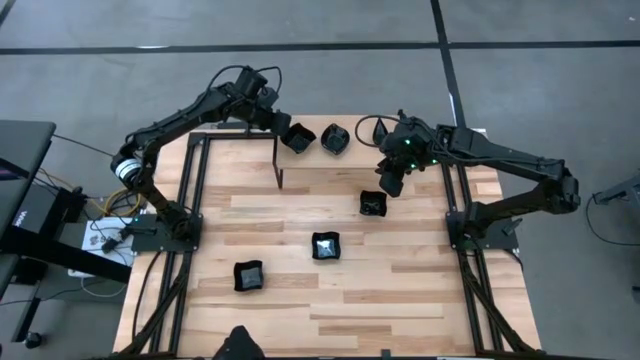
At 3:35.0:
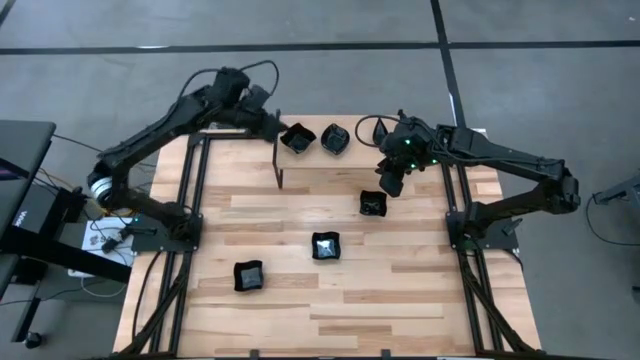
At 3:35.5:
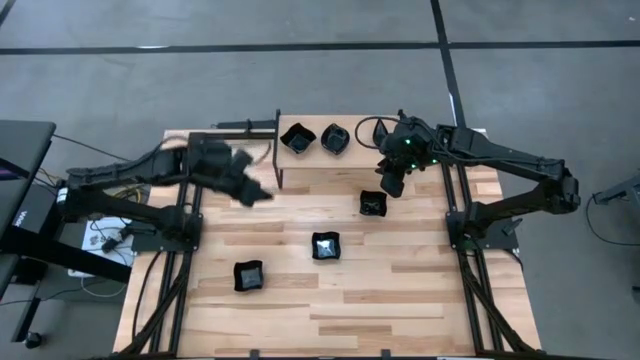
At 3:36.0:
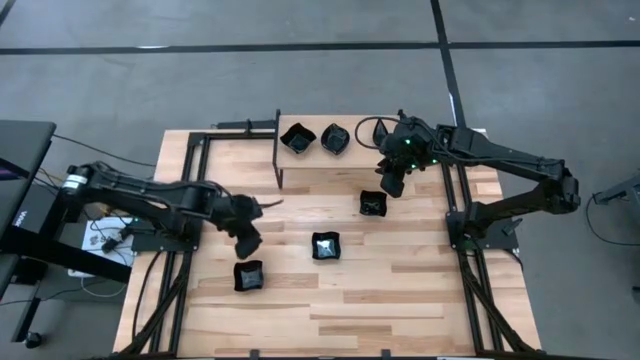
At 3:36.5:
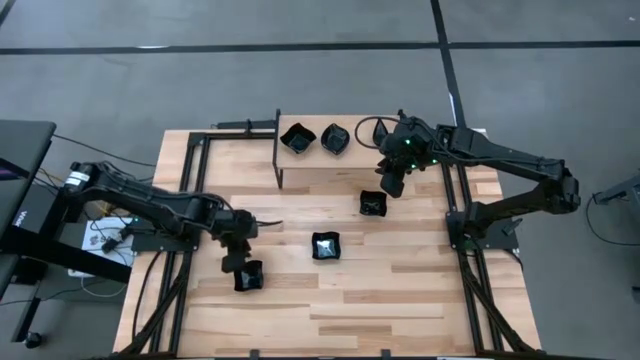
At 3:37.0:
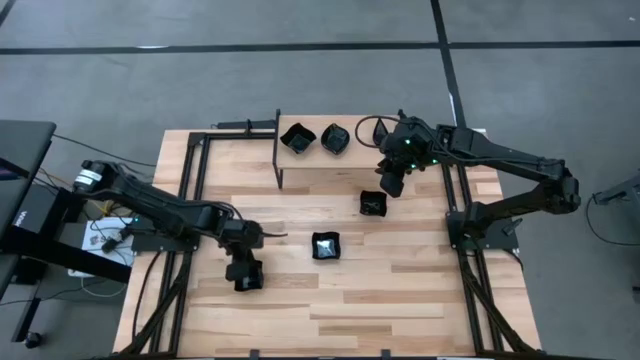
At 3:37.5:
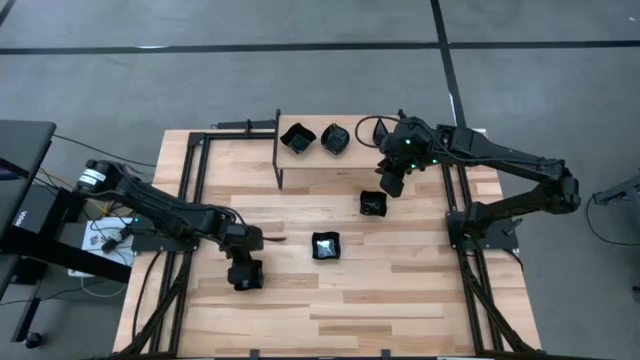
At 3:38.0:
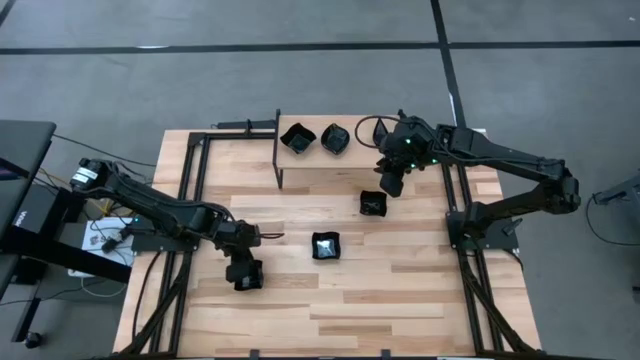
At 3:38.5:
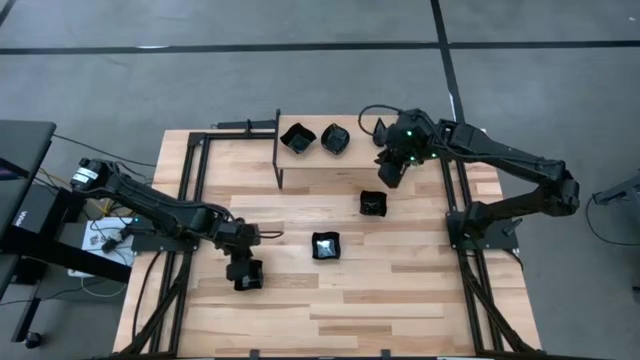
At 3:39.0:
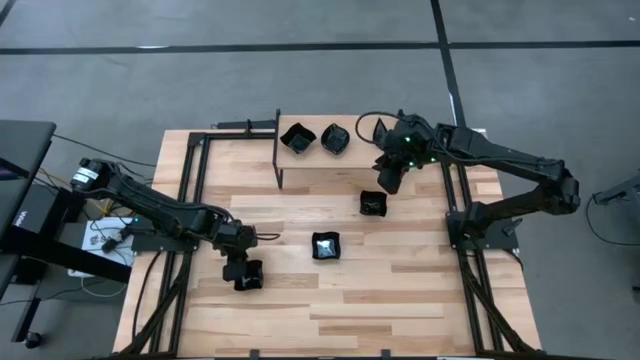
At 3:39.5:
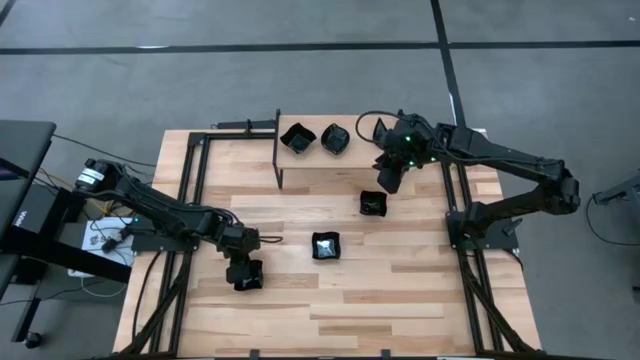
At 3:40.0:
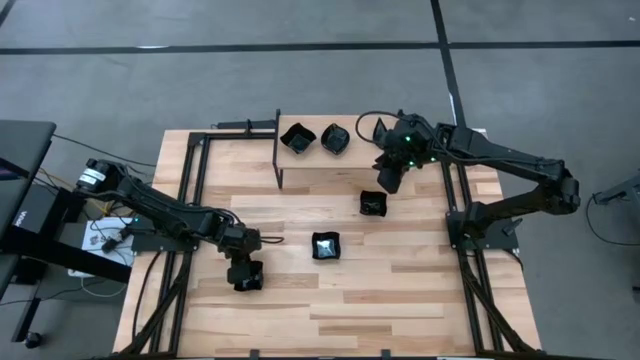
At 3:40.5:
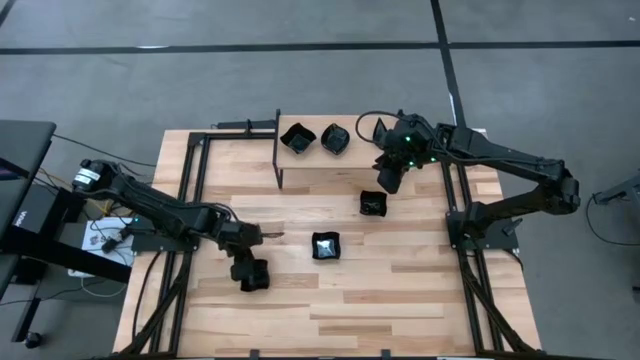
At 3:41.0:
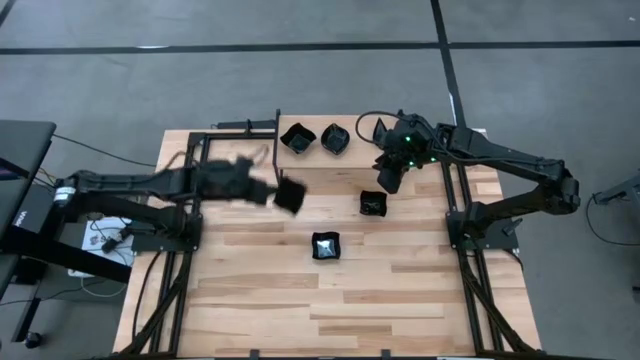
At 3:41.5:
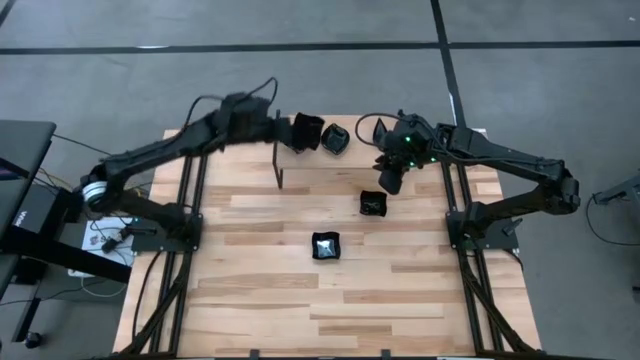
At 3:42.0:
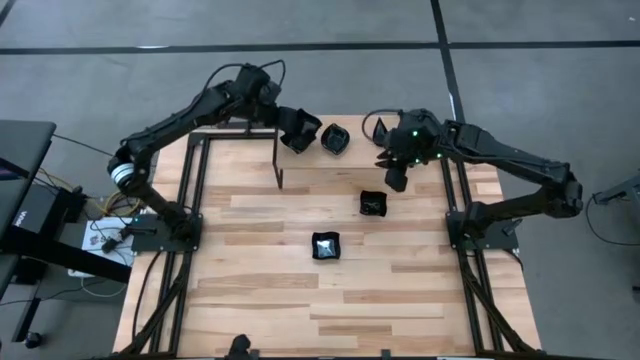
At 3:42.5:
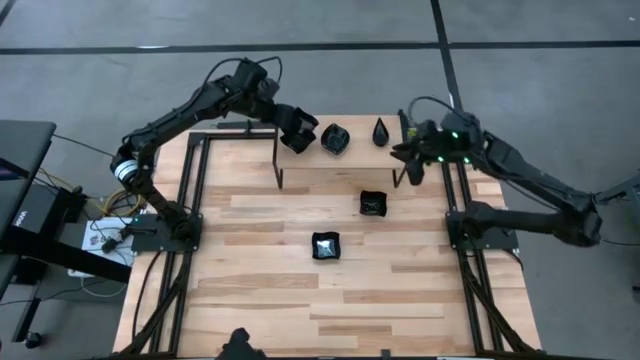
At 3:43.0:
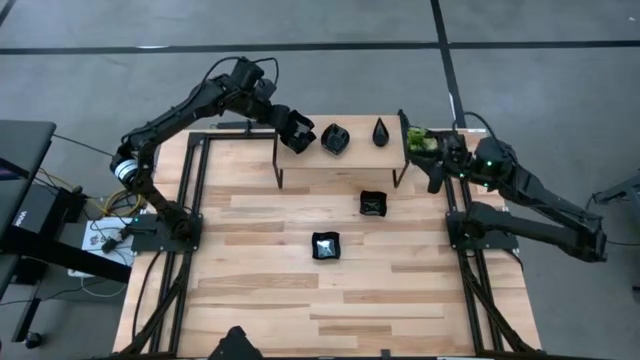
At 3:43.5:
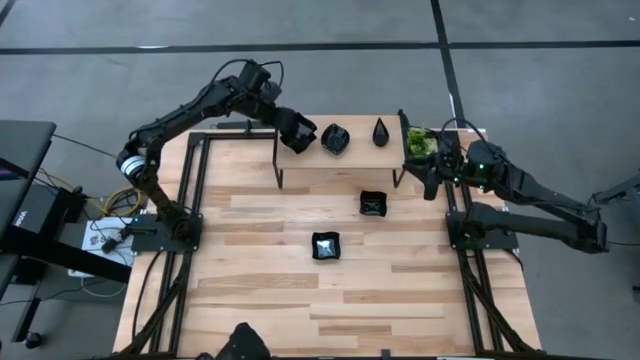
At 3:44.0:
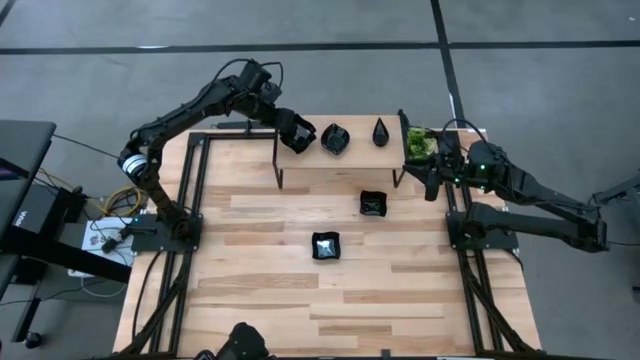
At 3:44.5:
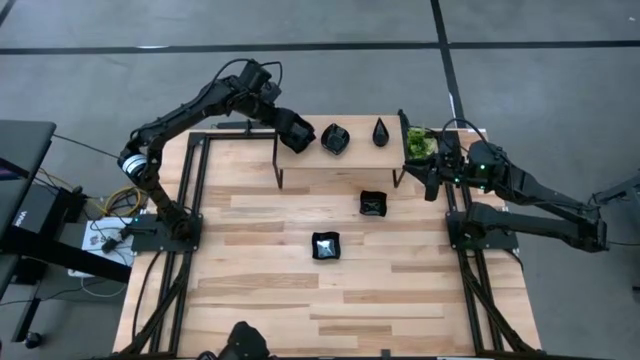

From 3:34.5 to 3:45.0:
Task: Pick & Place Mini shaped plates
Stack the distorted square plate on top of the distorted square plates on the shelf

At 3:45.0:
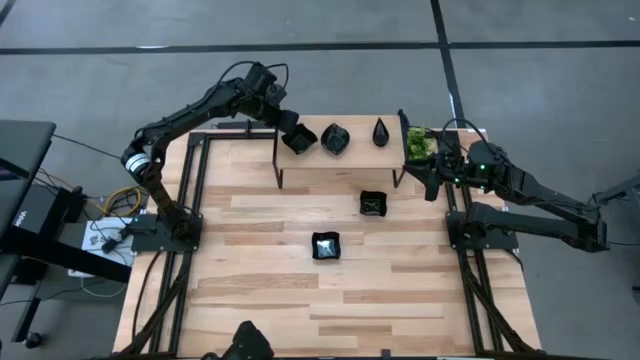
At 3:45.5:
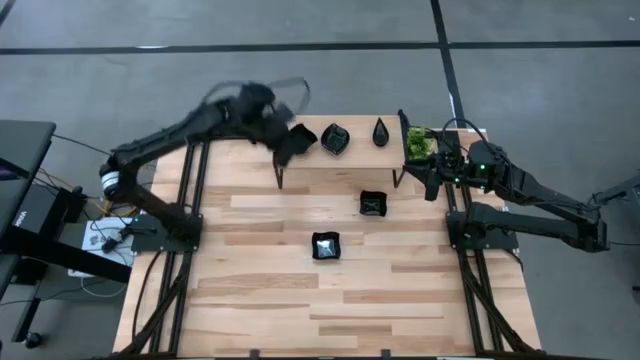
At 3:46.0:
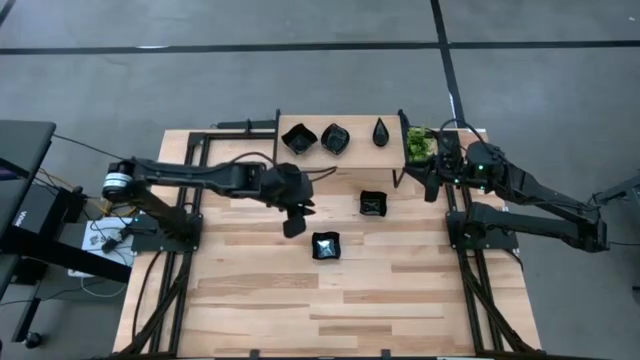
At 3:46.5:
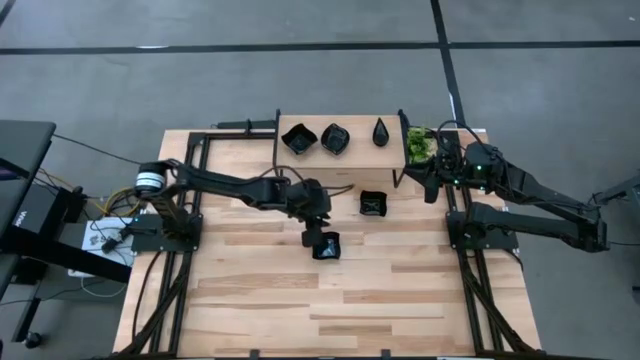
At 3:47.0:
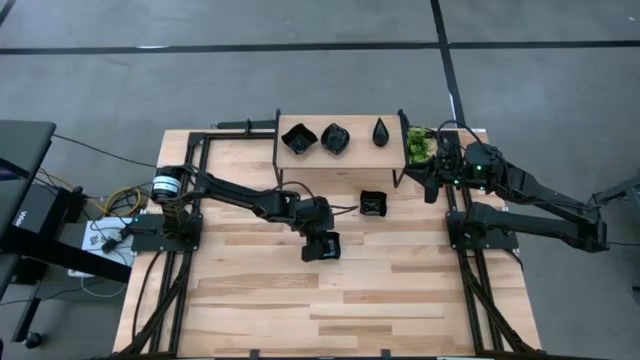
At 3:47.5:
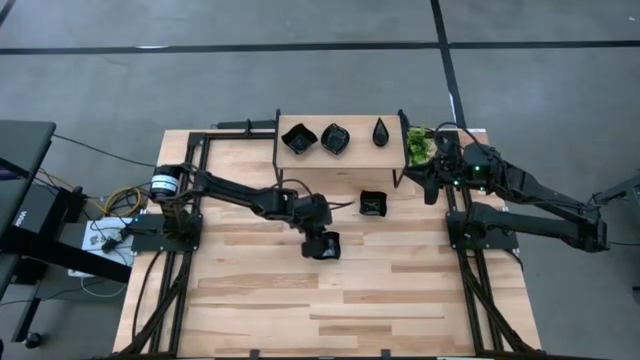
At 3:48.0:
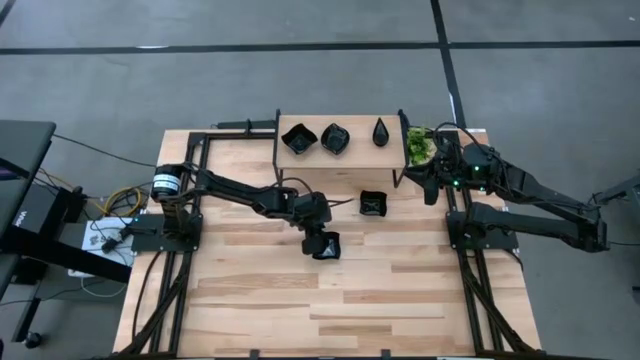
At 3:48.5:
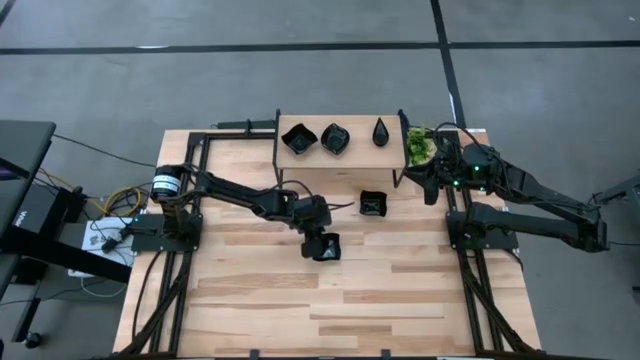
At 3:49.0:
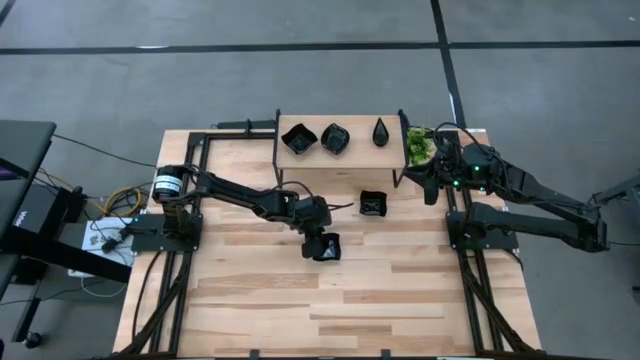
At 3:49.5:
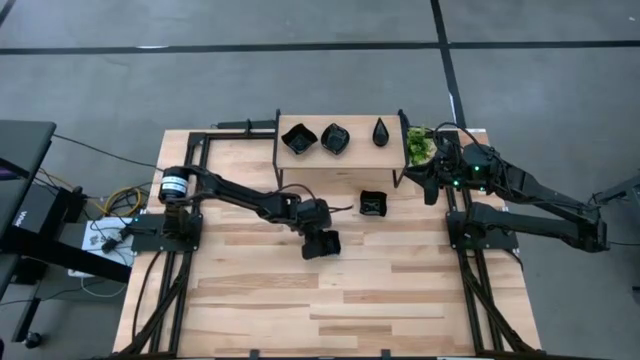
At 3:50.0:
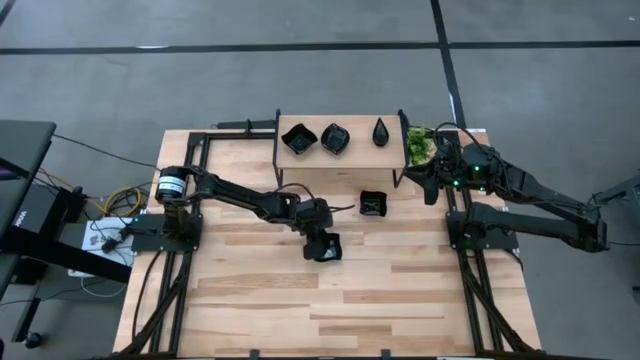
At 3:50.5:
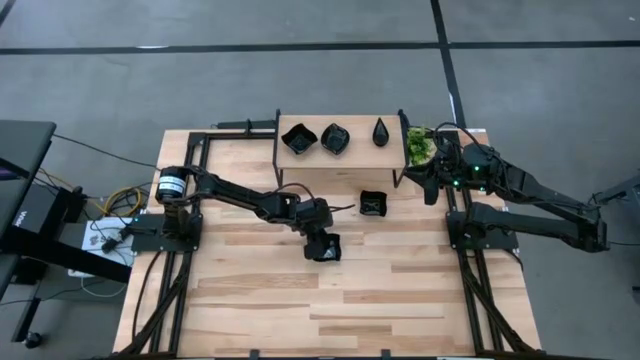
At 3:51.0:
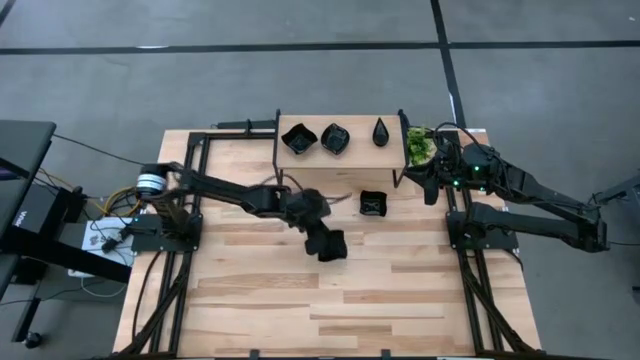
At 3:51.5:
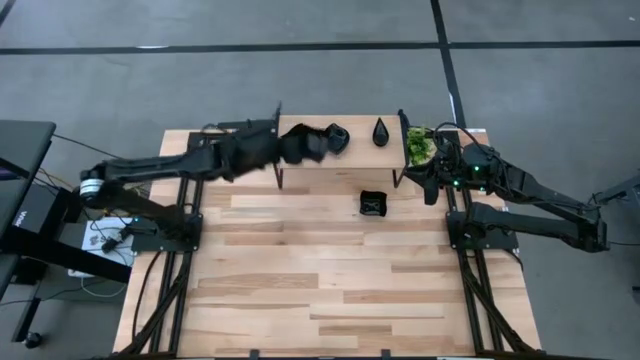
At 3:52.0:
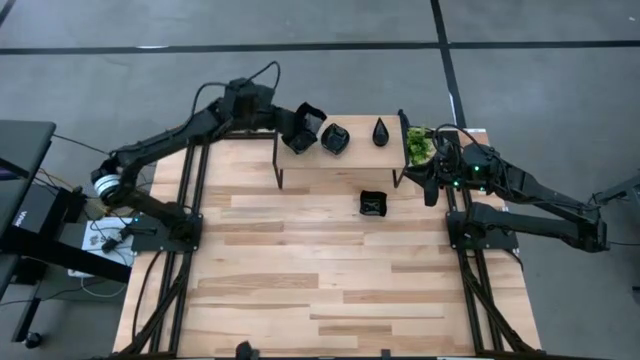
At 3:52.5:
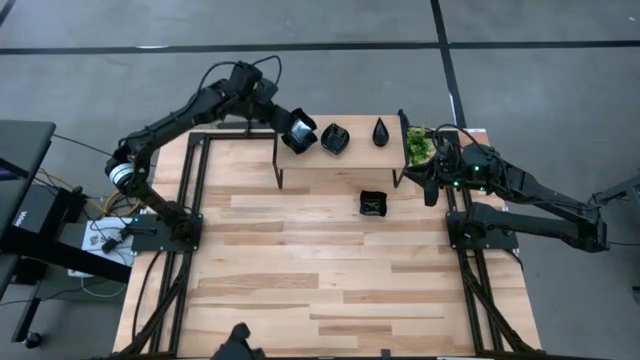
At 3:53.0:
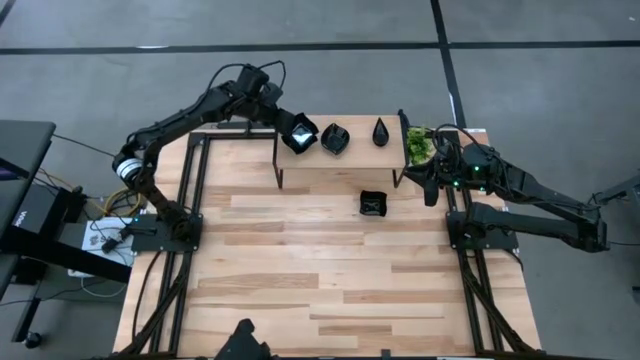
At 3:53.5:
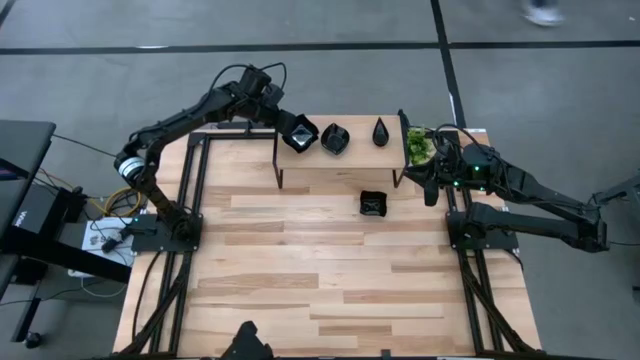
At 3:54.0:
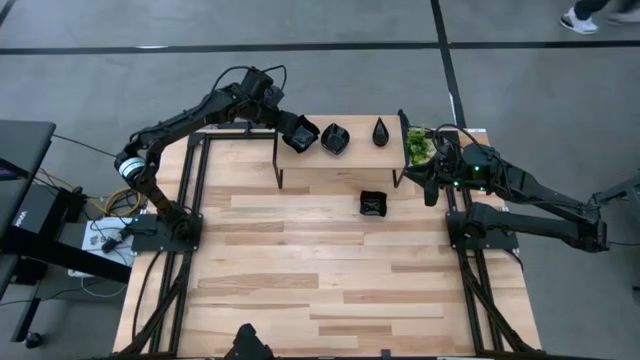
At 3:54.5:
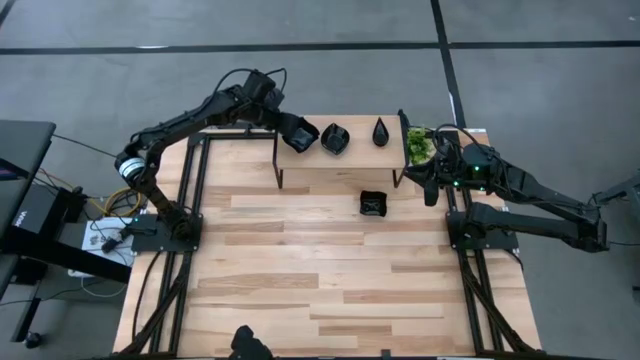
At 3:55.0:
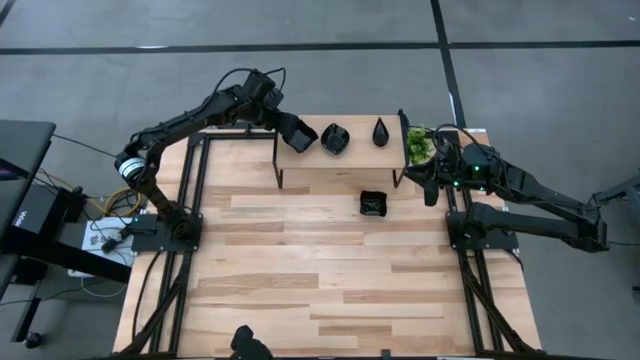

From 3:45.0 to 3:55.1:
Stack the distorted square plate on top of the distorted square plates on the shelf
